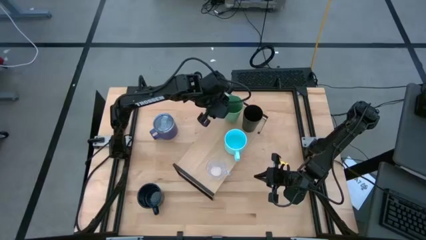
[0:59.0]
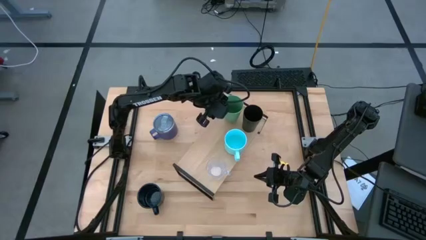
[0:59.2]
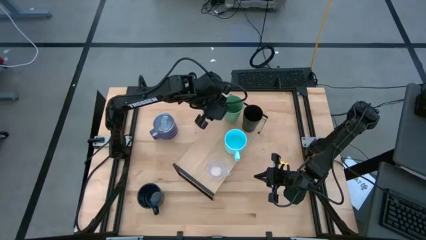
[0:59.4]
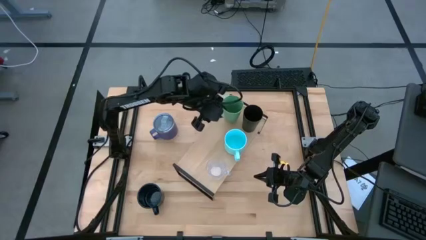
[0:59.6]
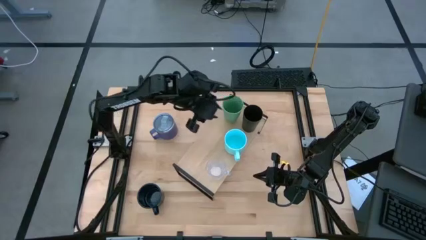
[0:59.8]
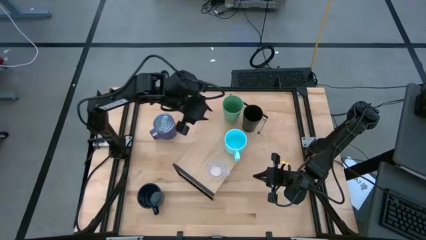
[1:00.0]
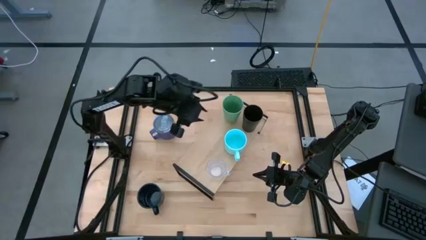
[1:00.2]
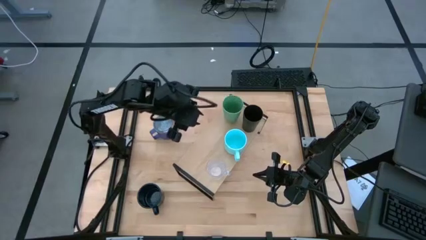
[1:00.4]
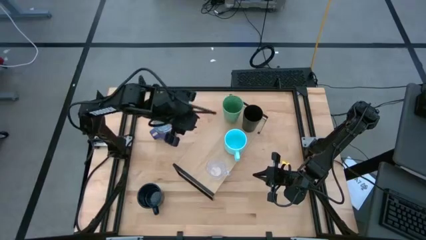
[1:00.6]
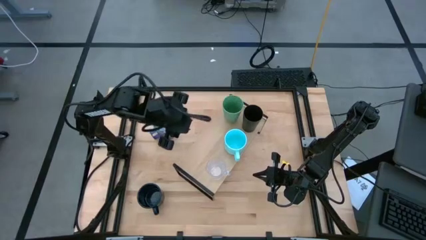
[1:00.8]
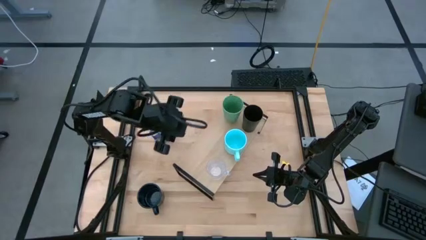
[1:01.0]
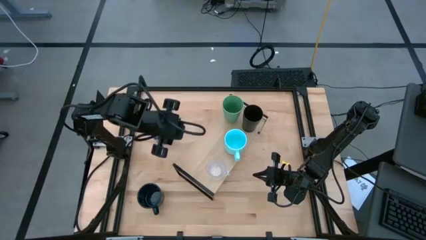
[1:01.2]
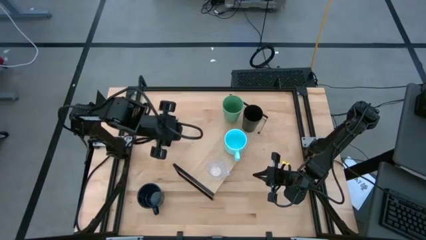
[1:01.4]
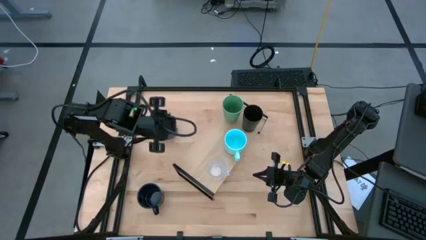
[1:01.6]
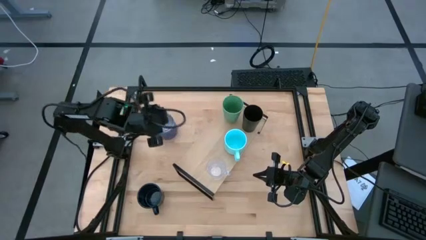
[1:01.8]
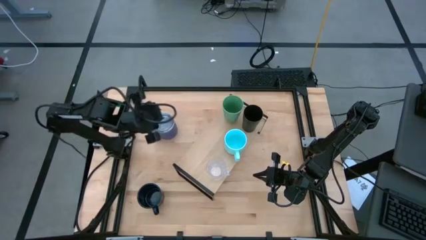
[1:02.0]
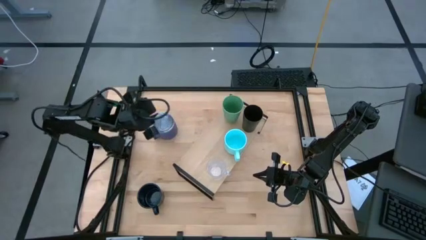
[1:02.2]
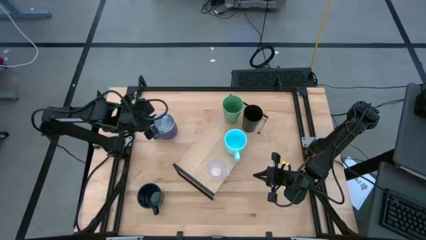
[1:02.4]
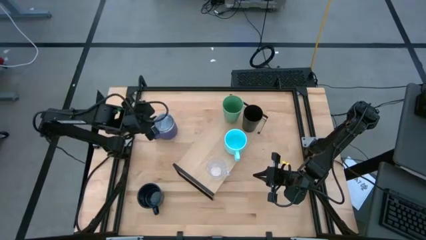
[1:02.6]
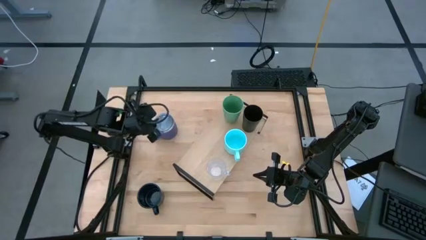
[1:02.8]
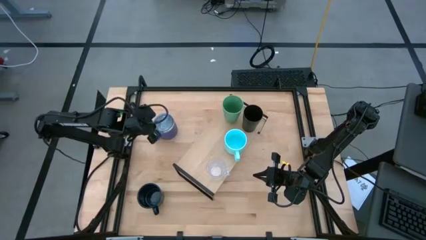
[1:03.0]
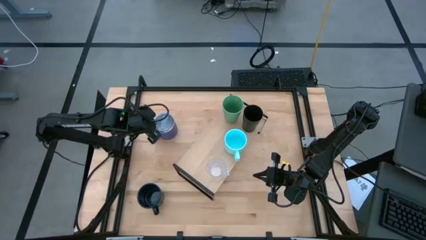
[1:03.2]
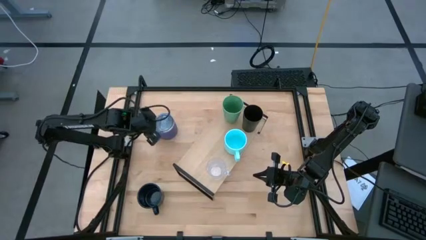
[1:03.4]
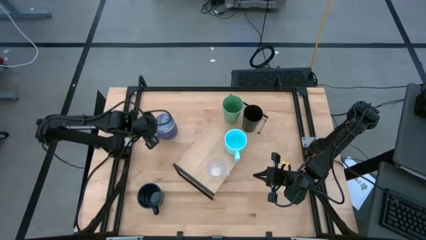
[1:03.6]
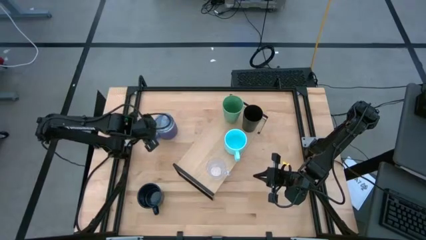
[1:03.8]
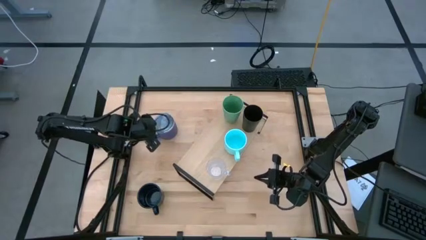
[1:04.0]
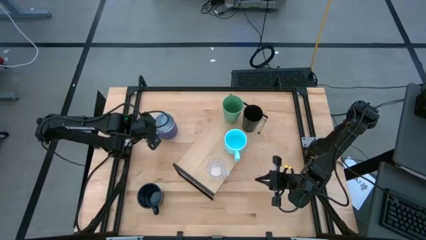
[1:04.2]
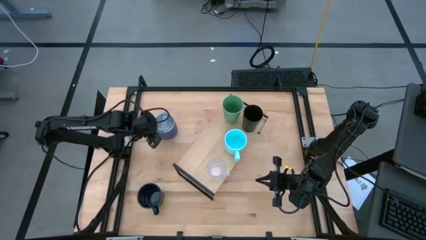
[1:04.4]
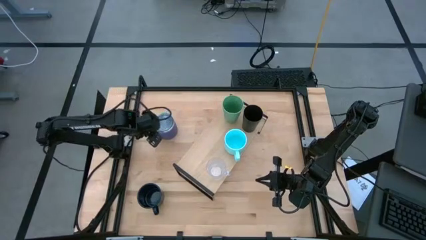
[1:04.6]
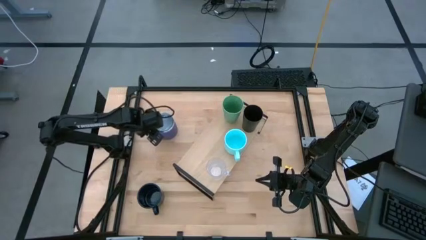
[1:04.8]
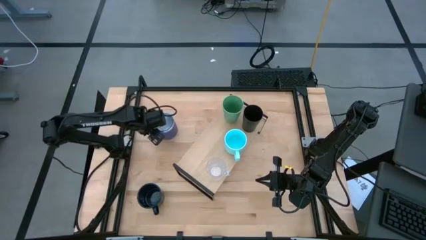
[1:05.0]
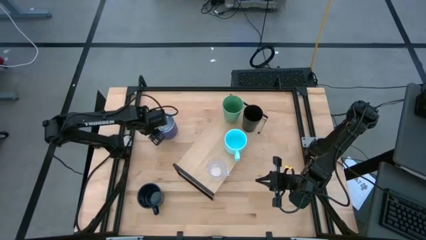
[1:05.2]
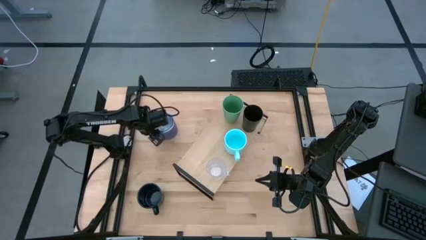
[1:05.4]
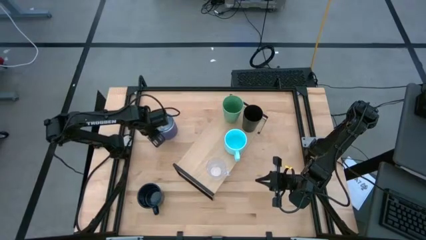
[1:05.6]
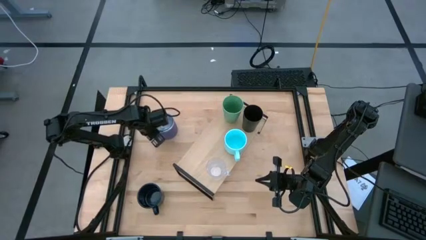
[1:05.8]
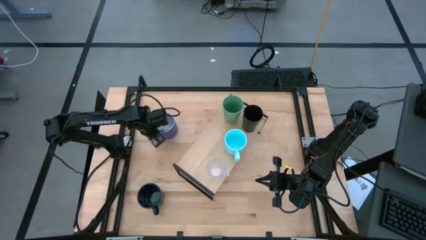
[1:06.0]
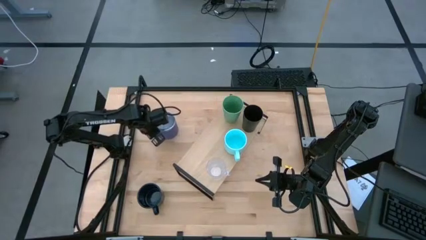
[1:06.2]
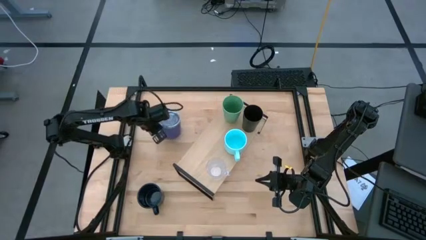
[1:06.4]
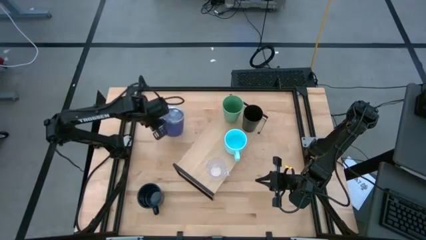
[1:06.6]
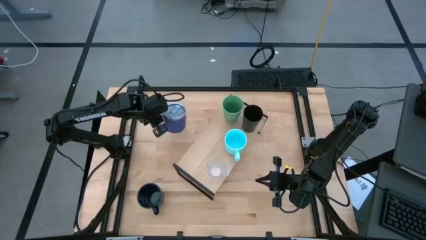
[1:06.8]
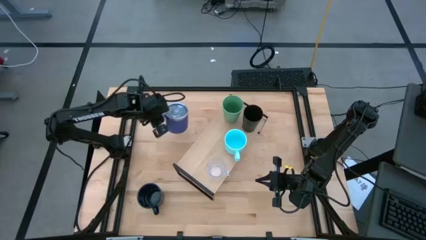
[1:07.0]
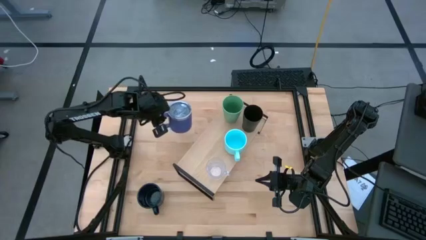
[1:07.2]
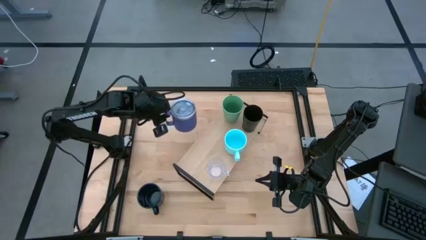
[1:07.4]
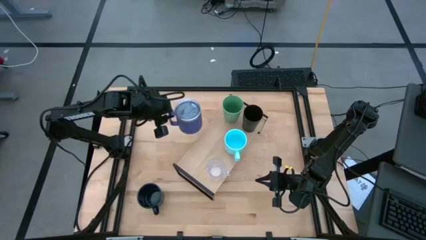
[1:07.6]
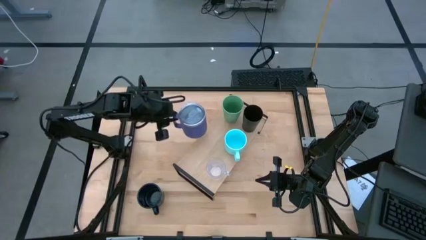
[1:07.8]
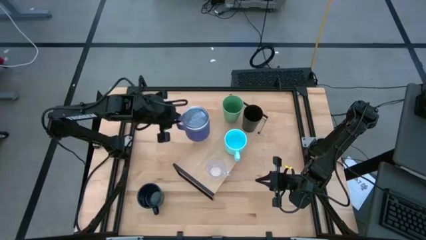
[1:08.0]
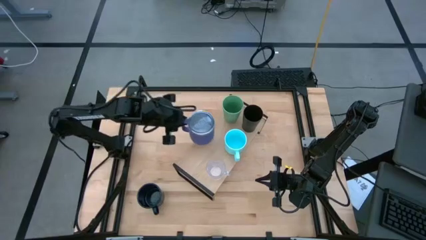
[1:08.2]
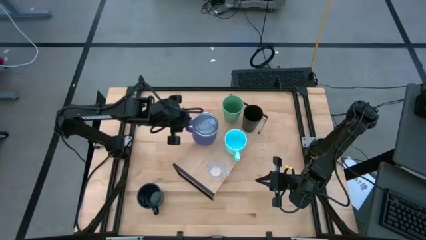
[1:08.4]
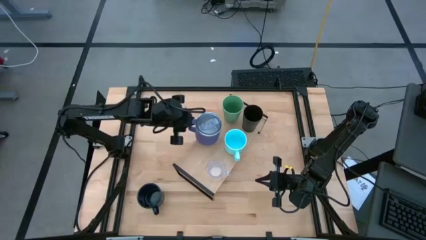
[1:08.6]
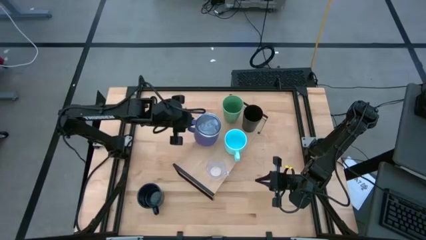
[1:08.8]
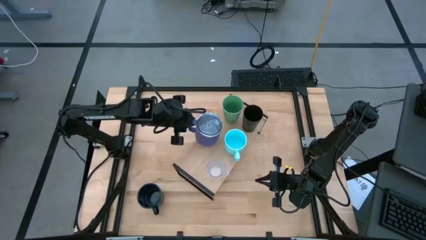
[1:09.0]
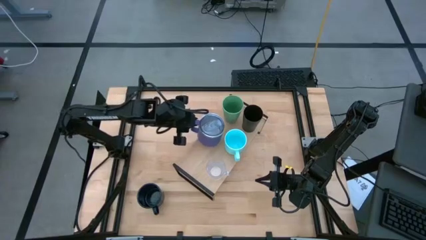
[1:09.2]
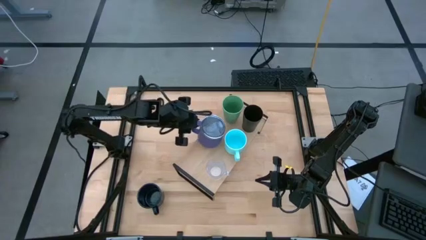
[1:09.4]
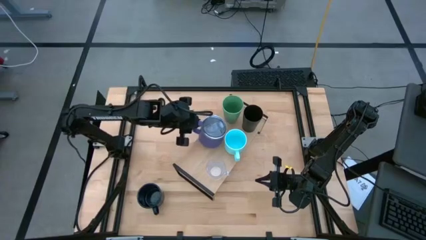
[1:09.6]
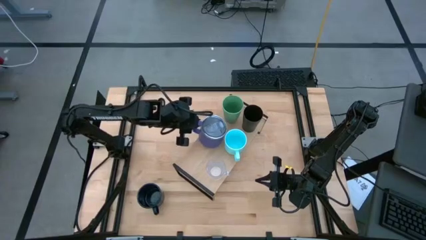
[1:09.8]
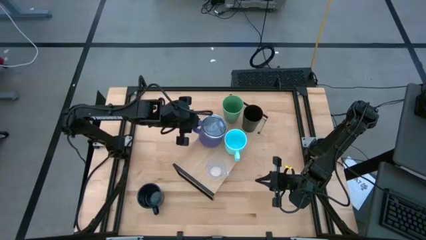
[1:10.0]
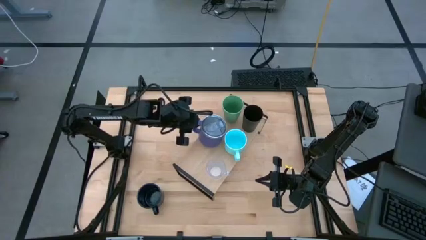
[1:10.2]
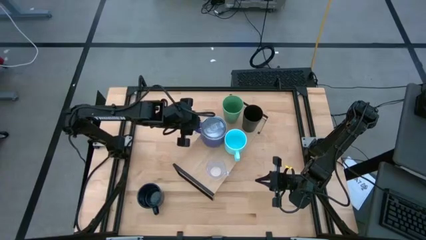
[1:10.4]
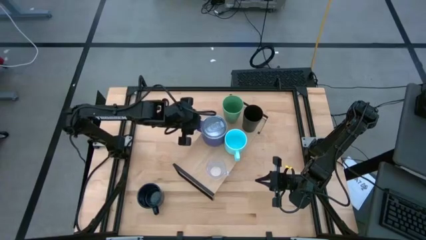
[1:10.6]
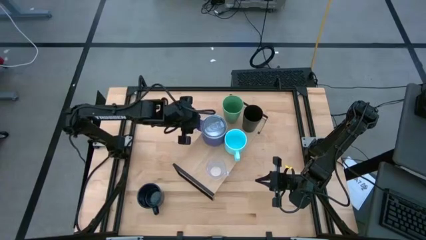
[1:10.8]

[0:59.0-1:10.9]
Task: Stack small to large cups/mugs on shelf
Put the violet mug on the shelf
